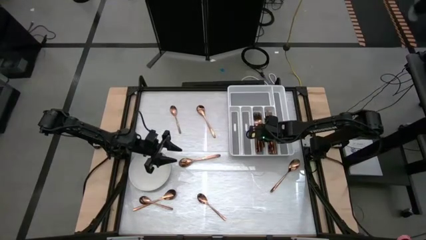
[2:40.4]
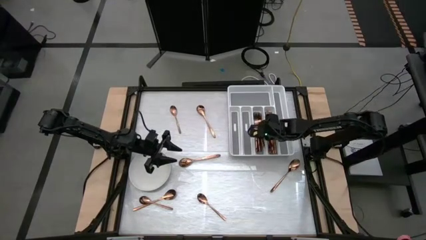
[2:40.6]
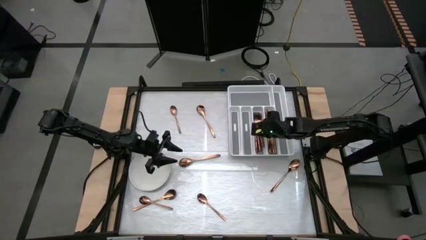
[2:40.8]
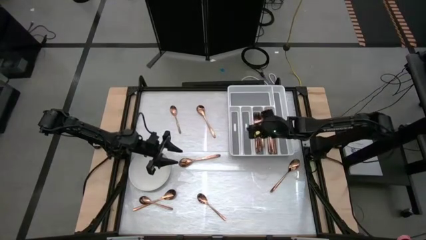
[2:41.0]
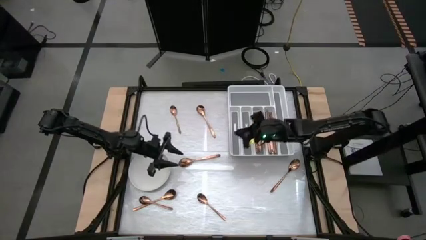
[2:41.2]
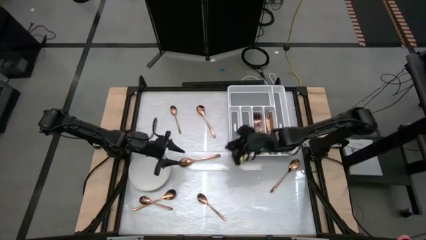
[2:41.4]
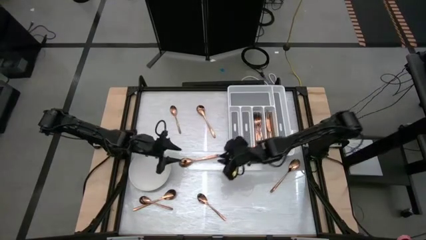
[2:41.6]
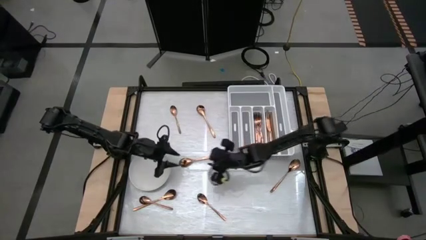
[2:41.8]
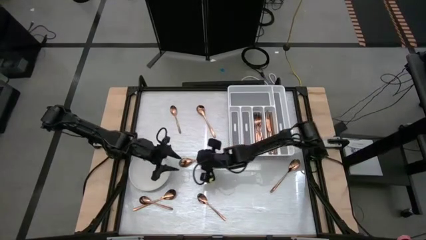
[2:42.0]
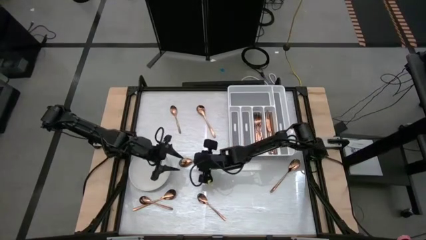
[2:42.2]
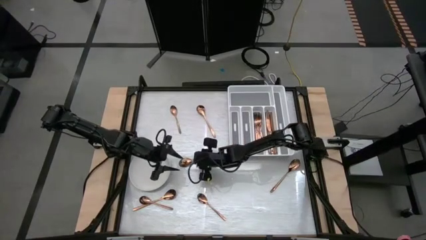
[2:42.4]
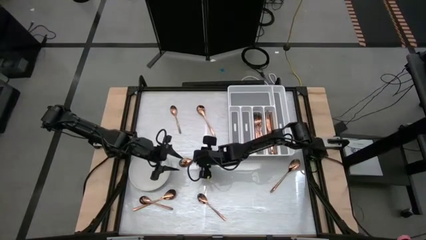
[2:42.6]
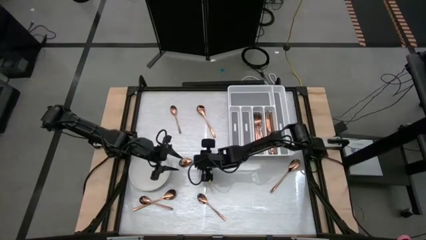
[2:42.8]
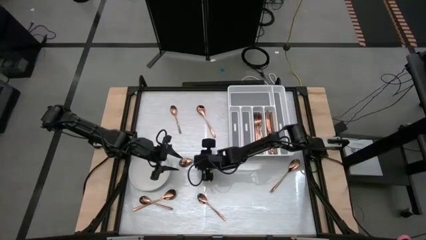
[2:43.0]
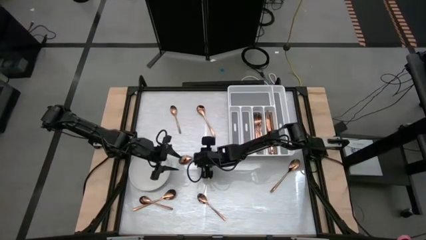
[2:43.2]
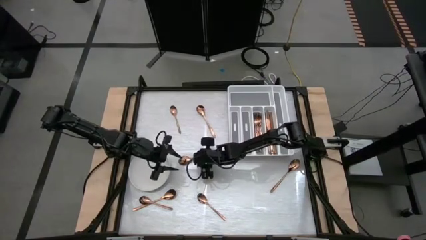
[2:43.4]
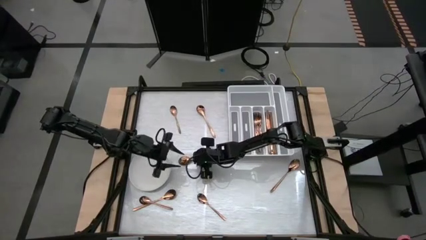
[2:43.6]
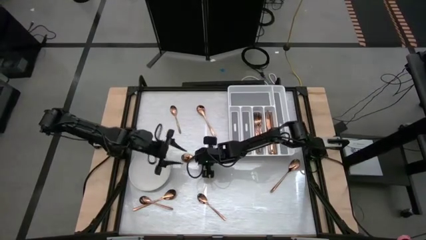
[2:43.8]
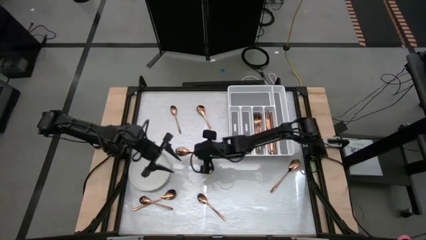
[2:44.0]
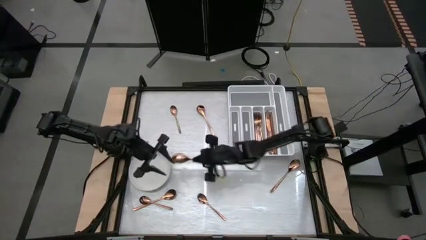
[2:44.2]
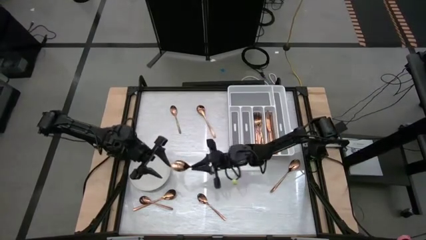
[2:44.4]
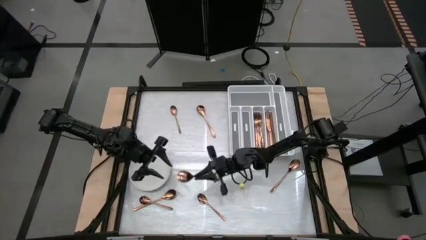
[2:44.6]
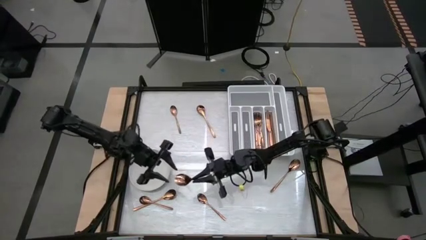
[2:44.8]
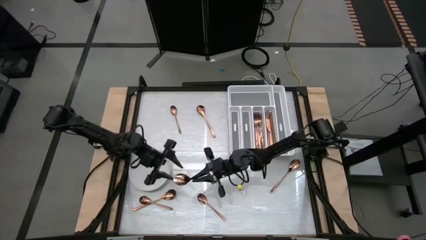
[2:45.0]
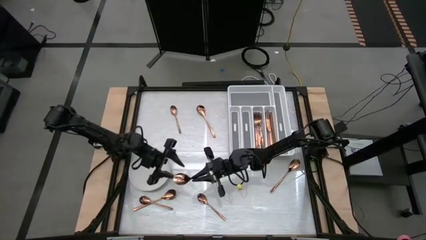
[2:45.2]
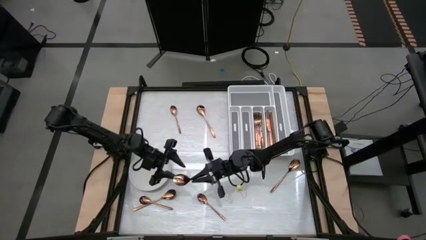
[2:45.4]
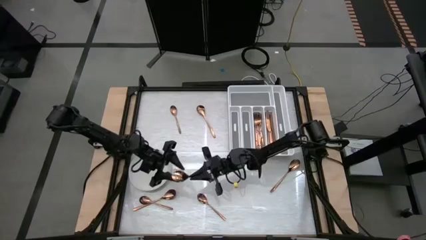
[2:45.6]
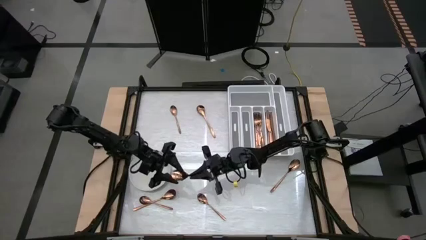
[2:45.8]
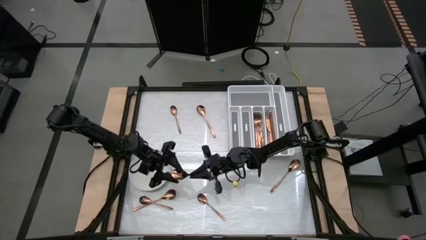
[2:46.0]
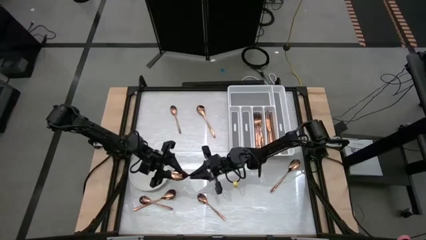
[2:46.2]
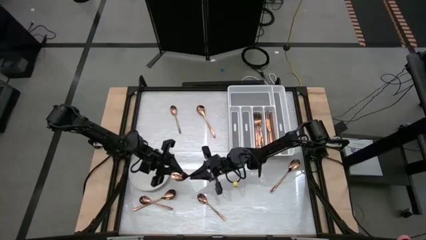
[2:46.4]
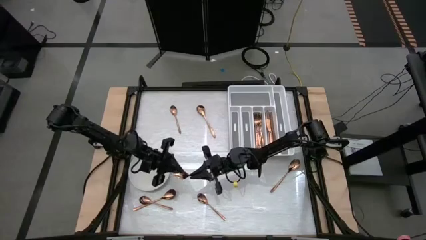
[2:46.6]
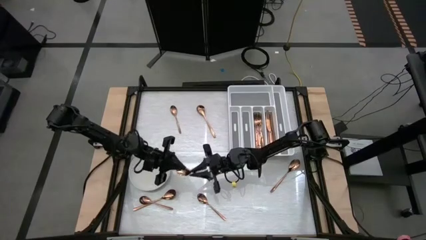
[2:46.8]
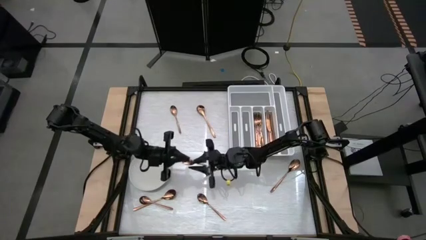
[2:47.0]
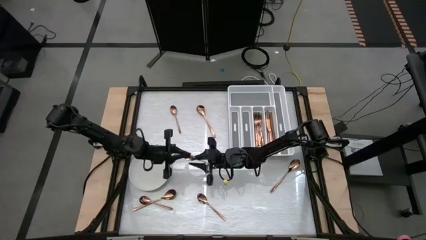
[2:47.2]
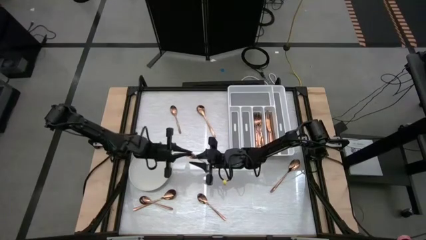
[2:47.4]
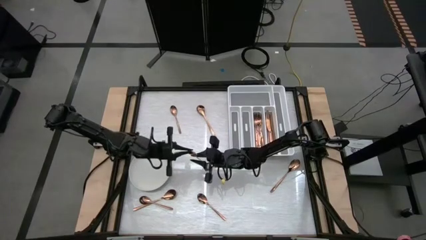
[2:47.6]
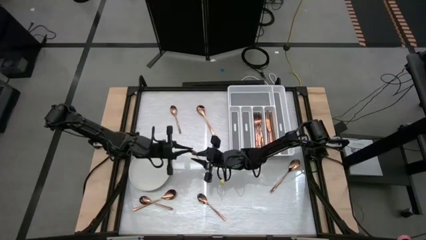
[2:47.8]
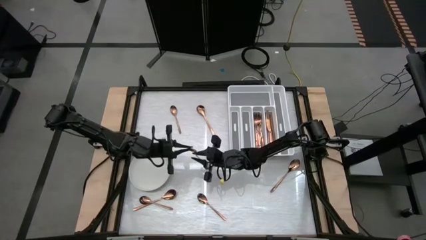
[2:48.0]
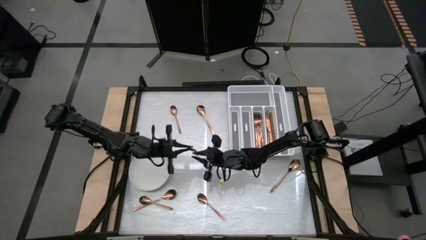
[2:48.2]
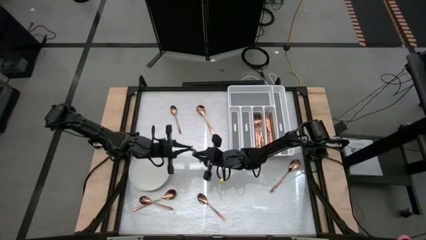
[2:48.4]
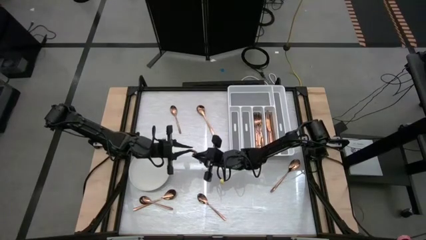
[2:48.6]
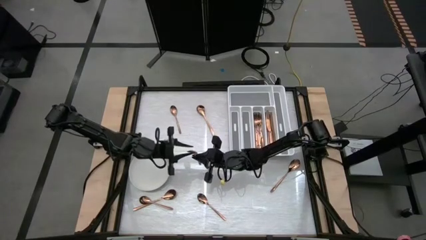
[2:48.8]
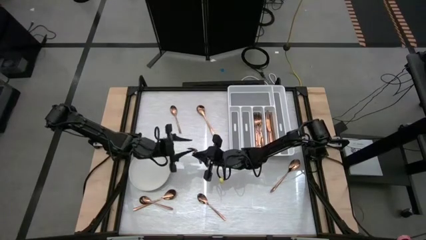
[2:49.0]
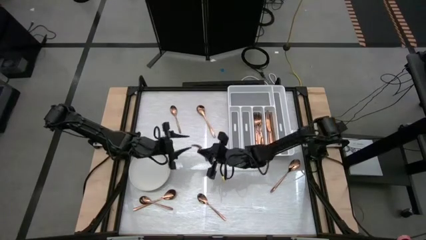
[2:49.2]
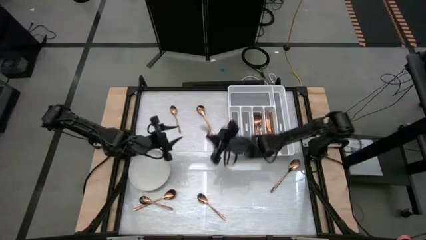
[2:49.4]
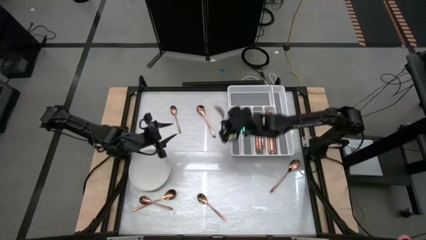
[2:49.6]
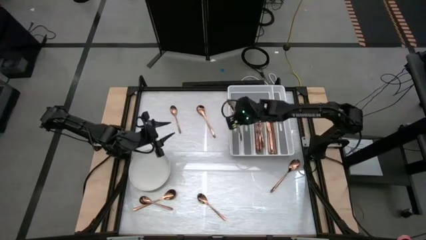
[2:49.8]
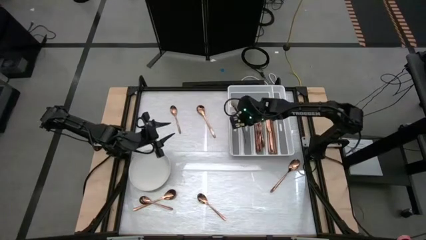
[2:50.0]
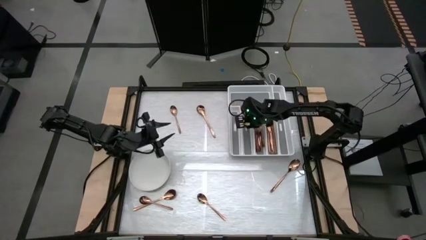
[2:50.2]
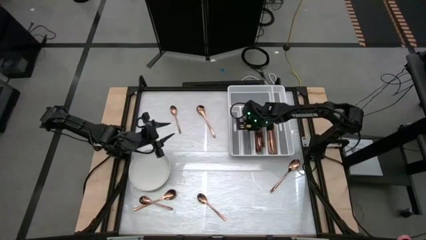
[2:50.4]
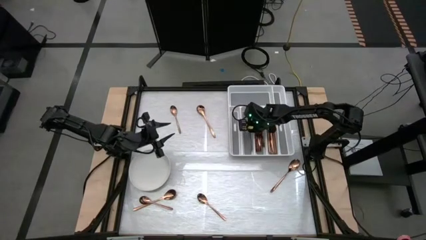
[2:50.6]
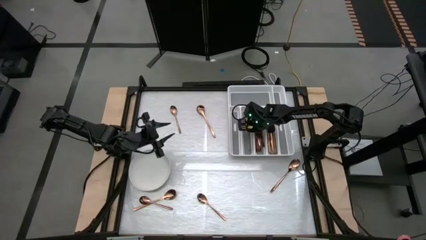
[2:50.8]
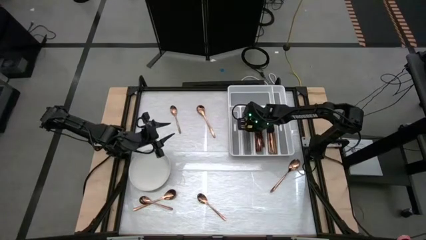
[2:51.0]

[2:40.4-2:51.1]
Task: Sort silverware
Put the bronze spoon into the silverware tray
